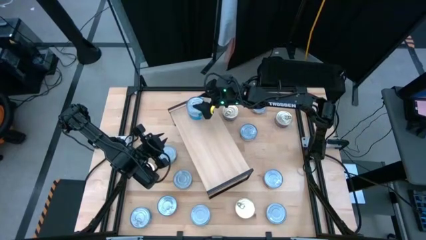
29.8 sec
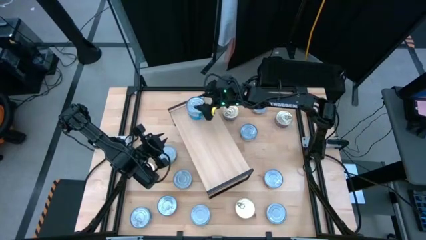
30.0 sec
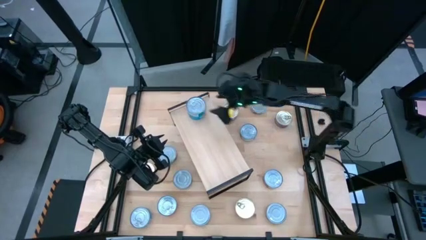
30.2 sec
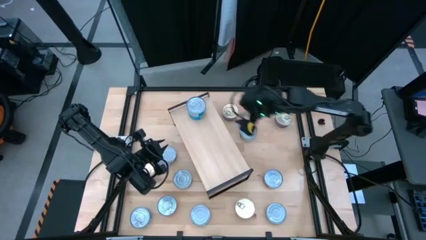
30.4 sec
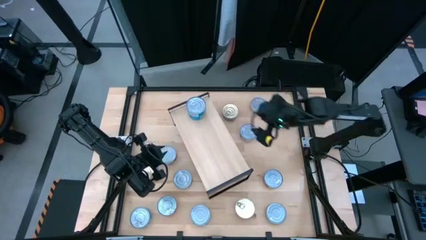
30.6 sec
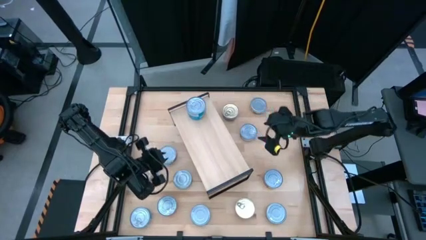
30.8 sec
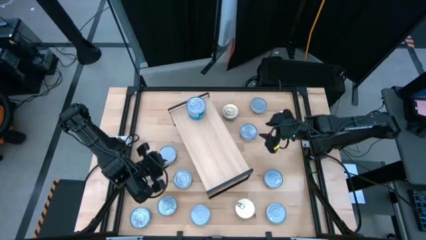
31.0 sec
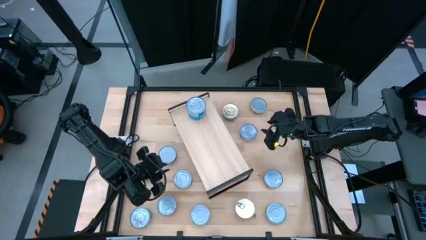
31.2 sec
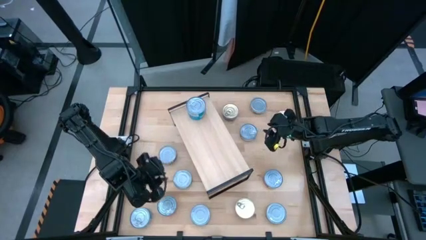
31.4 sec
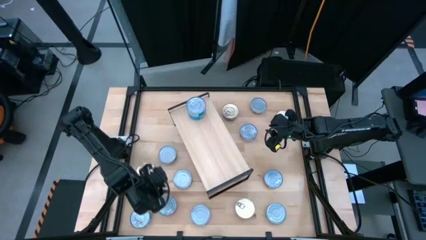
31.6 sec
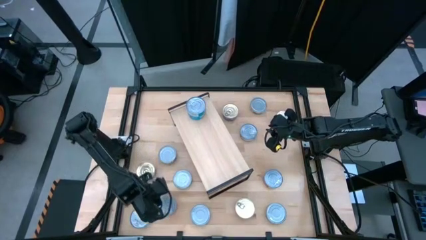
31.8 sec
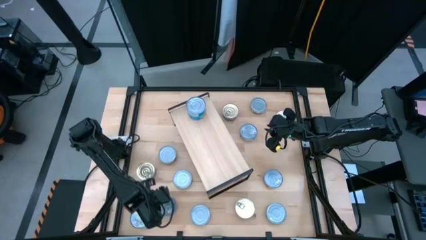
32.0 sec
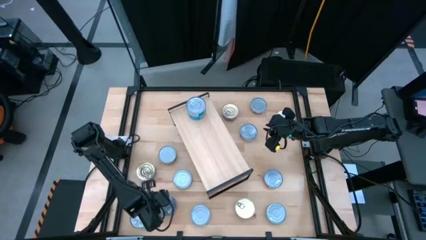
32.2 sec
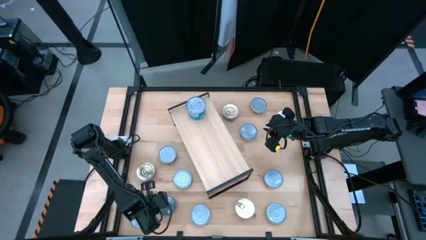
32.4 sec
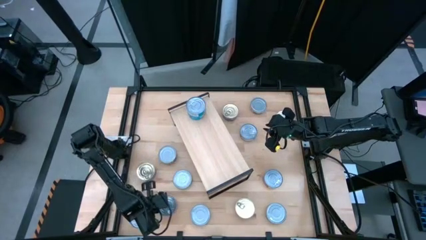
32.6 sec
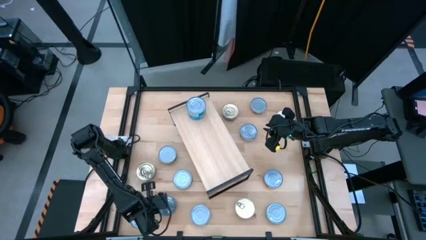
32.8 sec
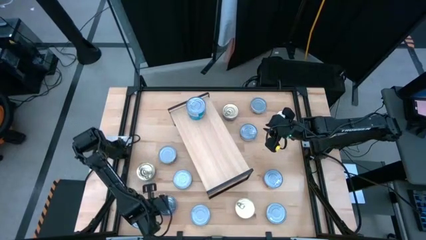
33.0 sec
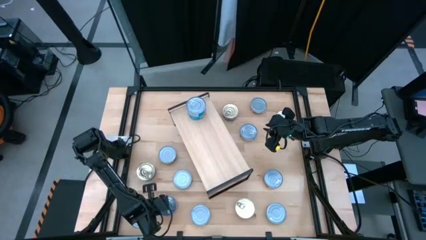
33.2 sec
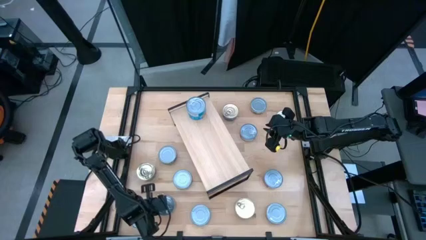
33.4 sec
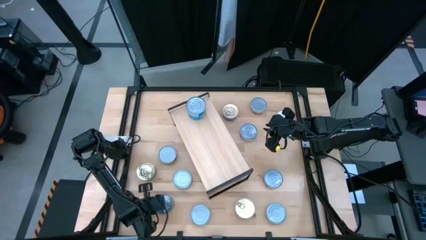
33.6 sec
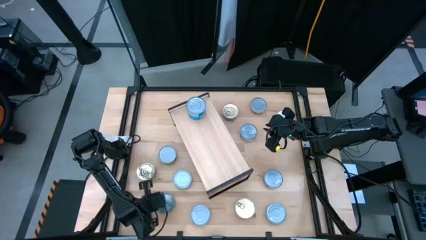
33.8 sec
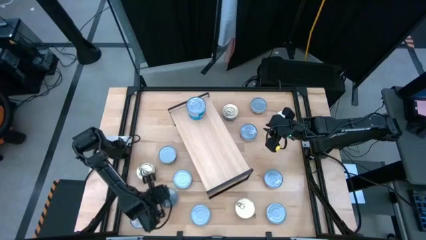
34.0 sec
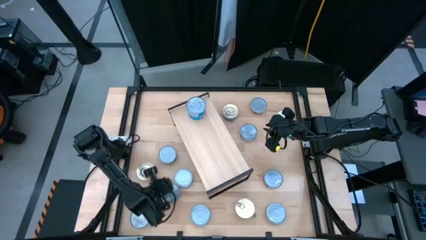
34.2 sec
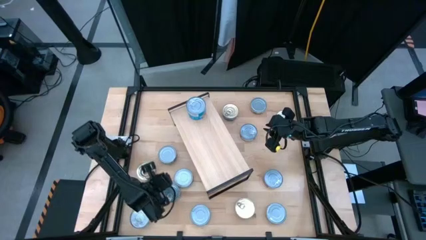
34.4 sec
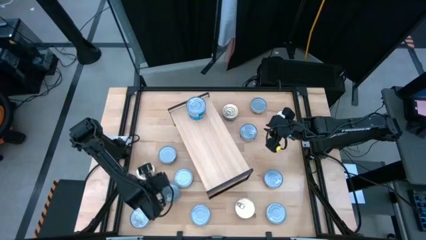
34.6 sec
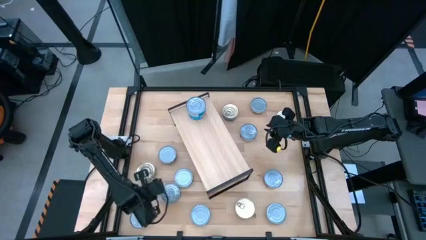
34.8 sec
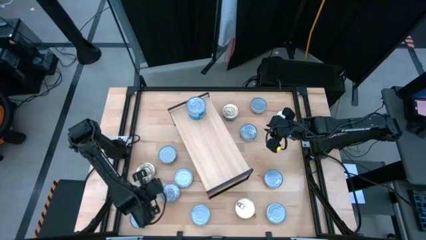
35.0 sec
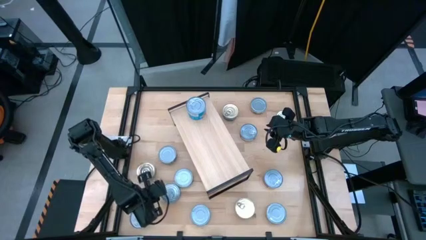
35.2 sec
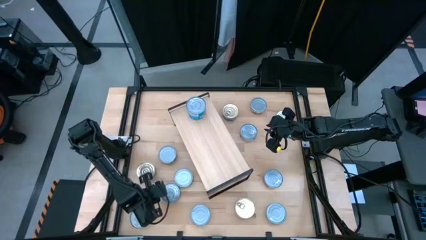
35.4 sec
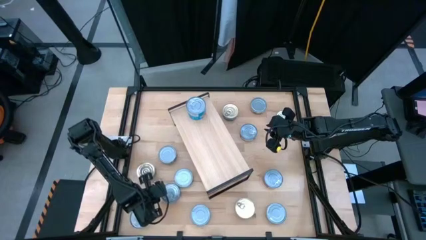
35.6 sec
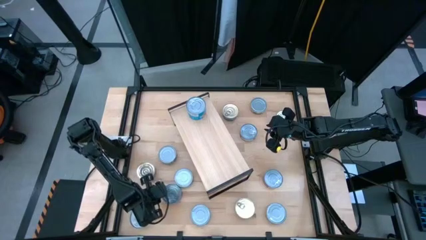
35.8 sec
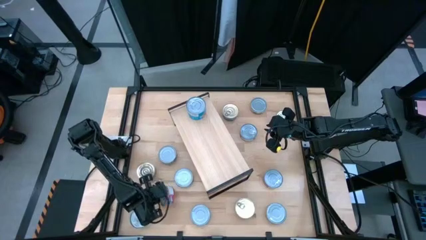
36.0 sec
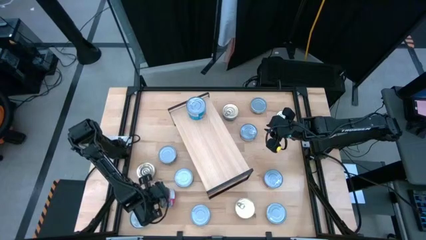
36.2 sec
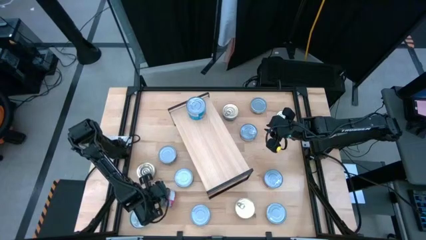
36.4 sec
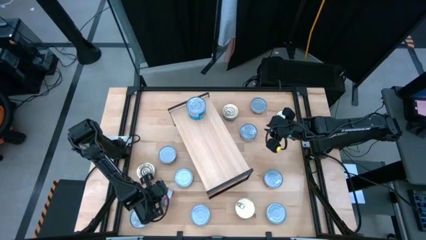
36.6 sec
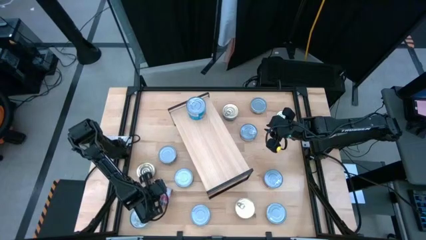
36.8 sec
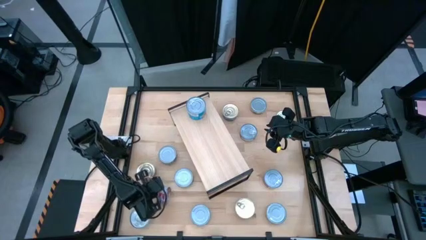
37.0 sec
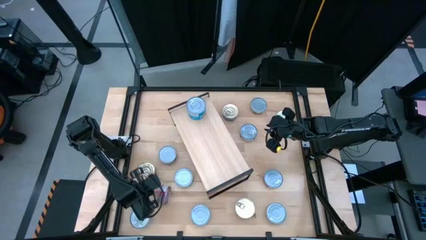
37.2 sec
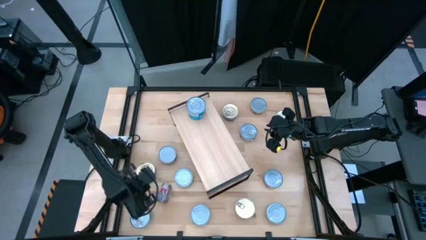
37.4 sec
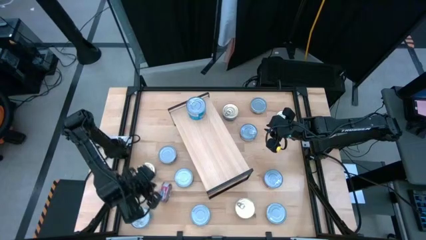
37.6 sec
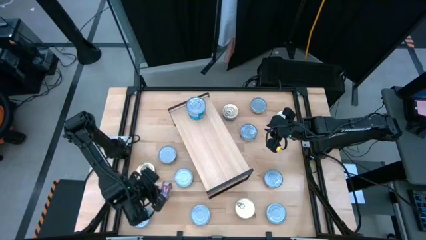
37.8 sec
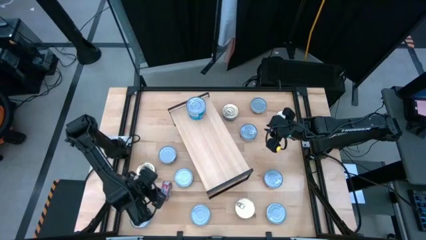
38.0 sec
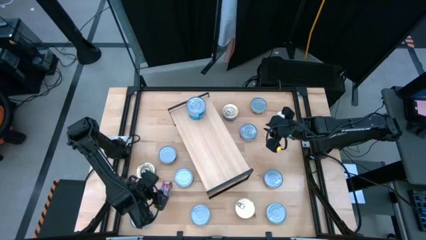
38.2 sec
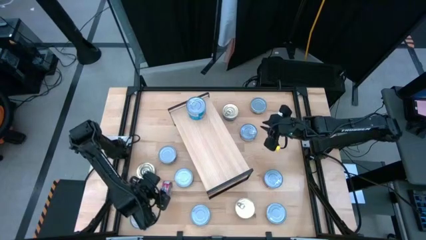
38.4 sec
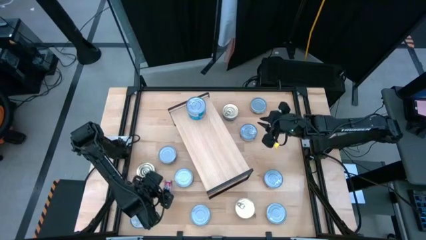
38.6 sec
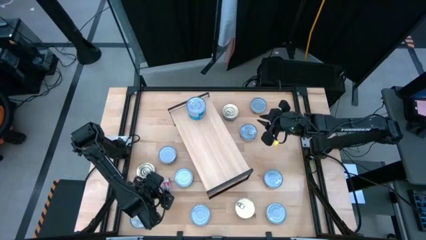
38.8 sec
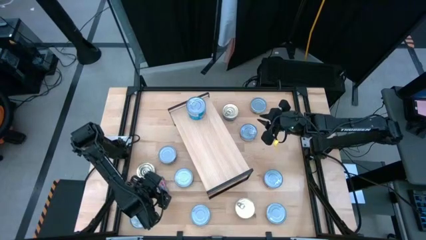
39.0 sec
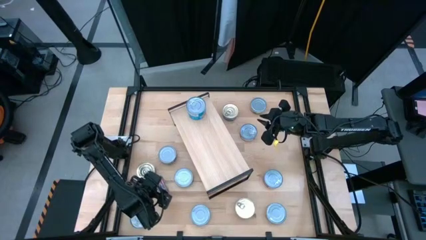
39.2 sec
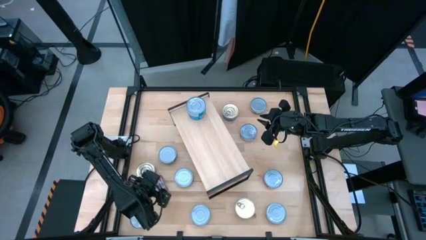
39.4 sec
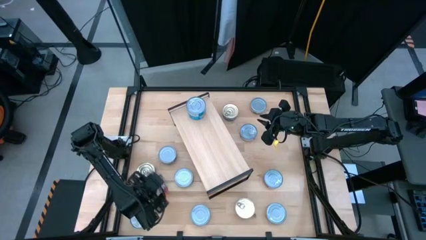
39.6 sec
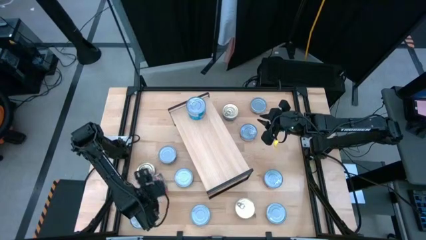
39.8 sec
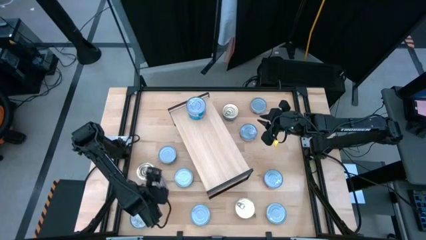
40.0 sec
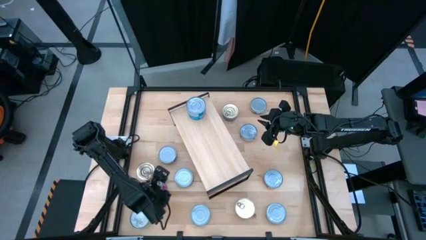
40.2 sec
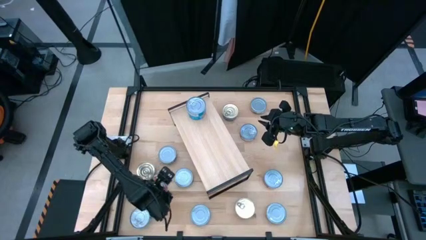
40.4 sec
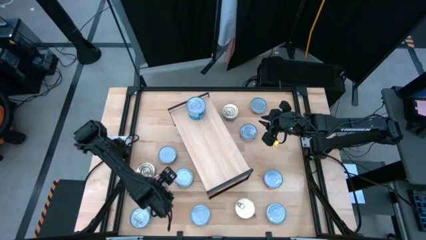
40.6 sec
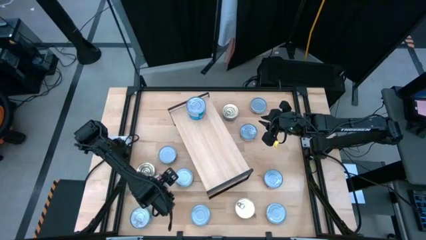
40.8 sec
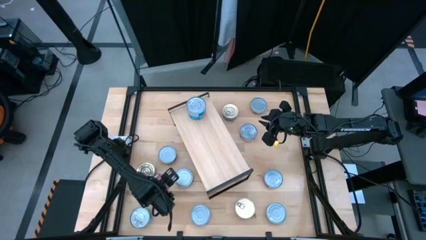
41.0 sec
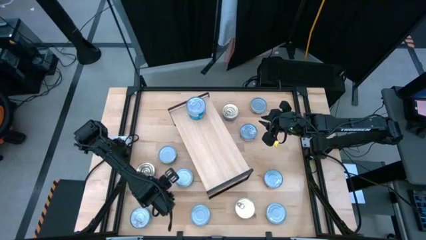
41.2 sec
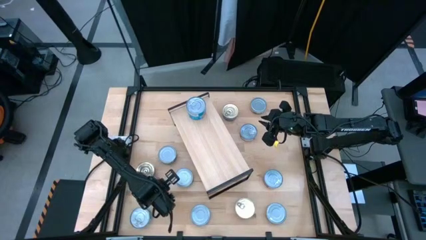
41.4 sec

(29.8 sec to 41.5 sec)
Task: Stack canned seafood by type on shelf
Put the red tuna can on the shelf
